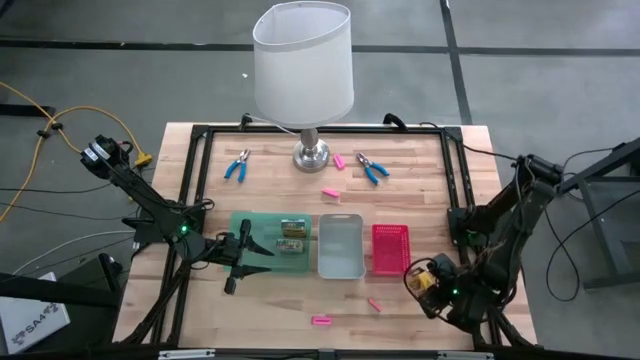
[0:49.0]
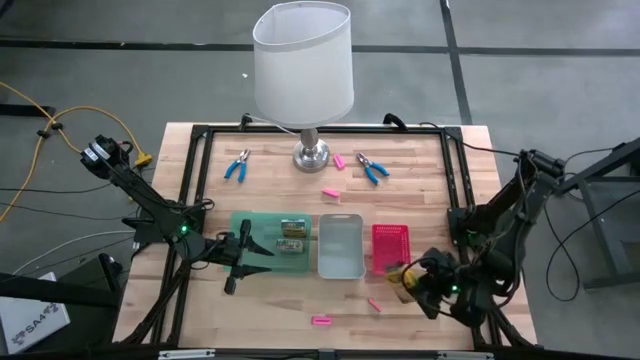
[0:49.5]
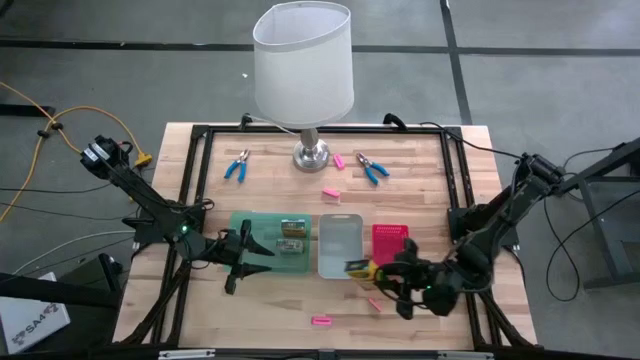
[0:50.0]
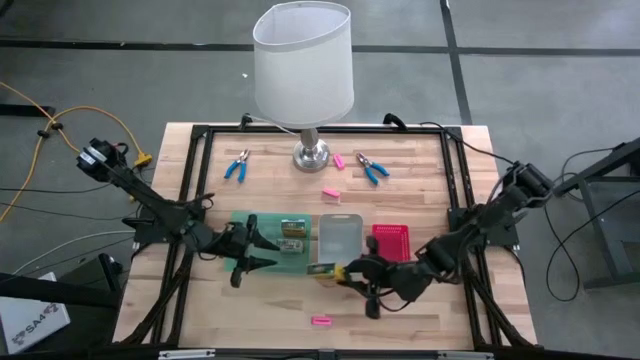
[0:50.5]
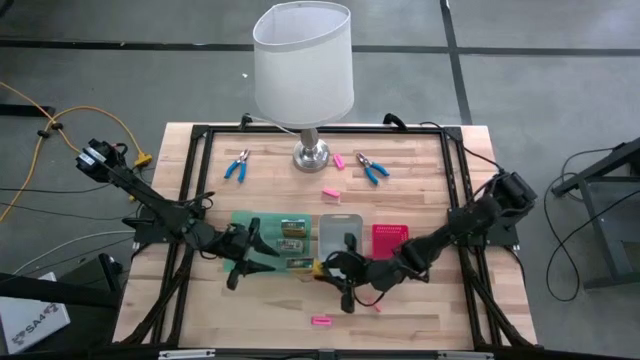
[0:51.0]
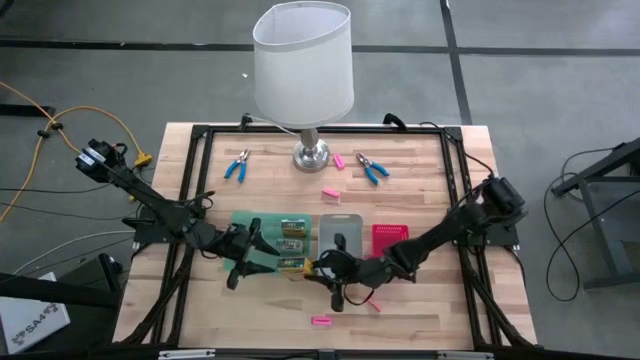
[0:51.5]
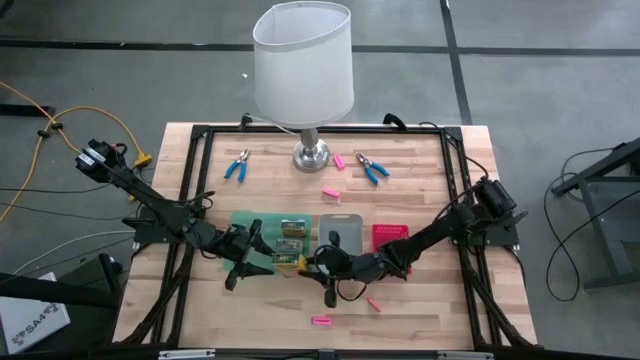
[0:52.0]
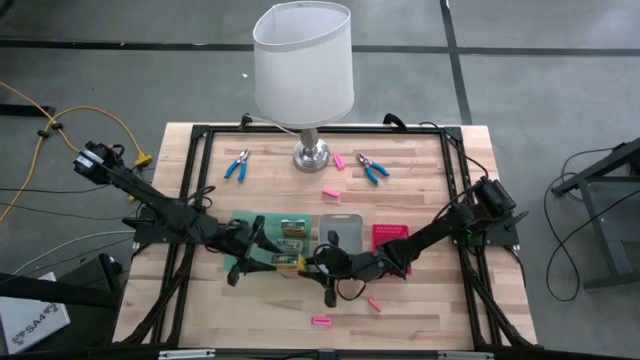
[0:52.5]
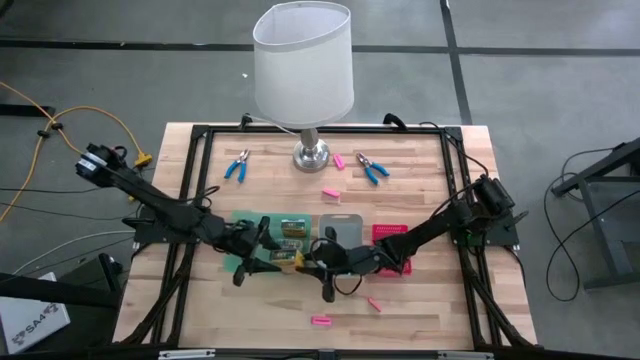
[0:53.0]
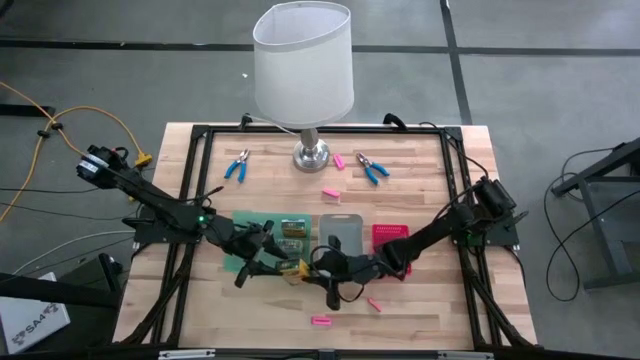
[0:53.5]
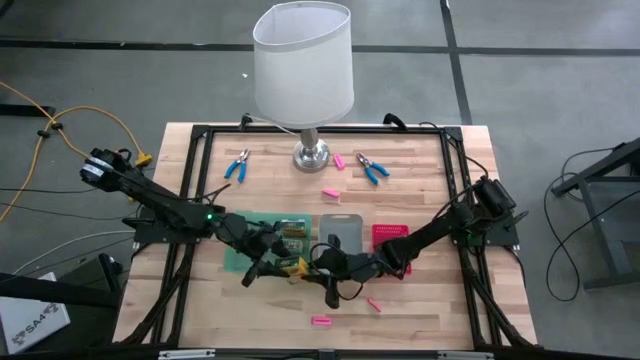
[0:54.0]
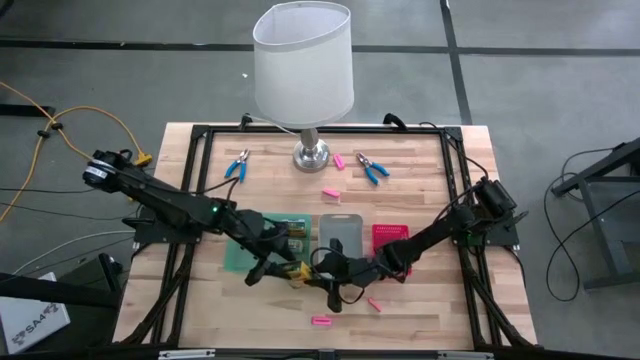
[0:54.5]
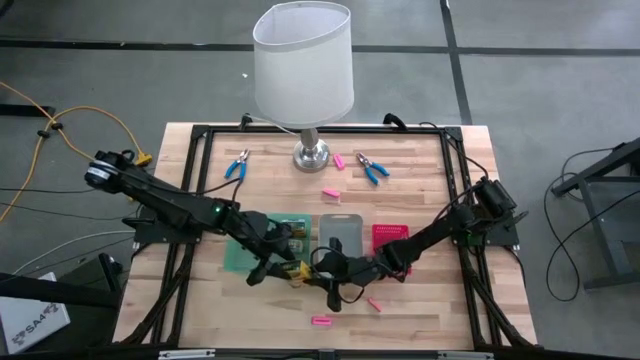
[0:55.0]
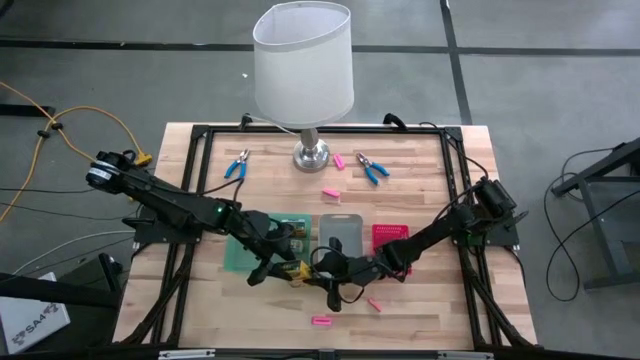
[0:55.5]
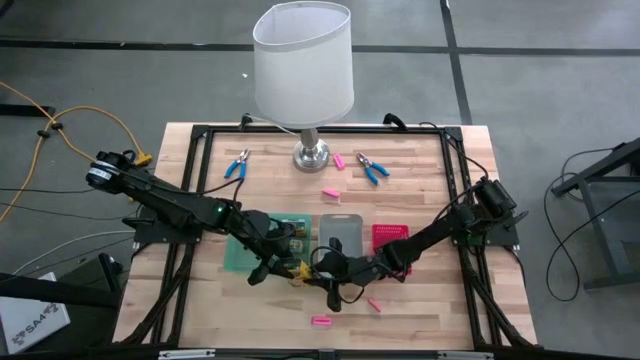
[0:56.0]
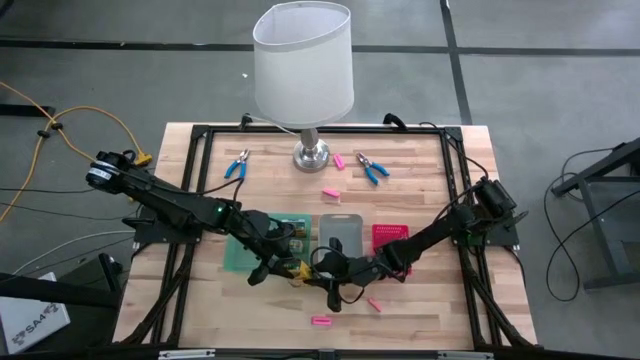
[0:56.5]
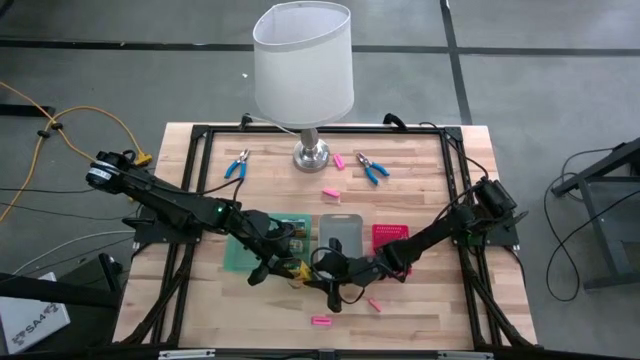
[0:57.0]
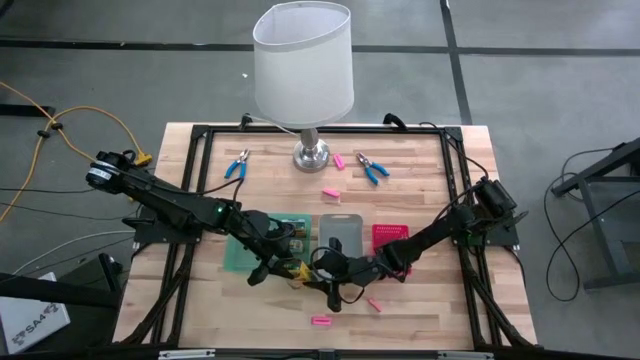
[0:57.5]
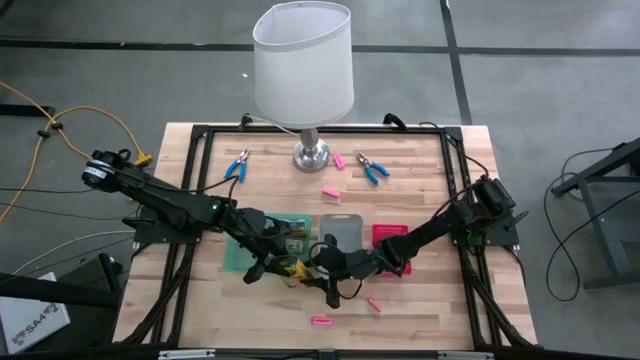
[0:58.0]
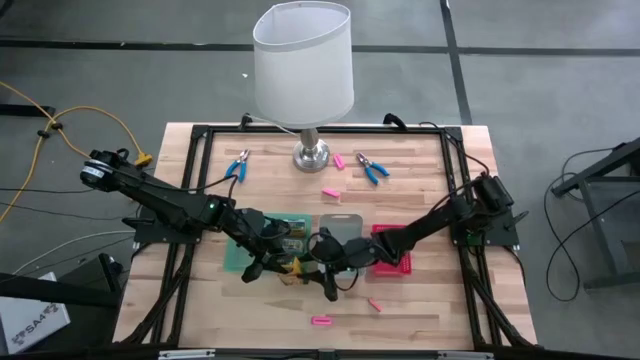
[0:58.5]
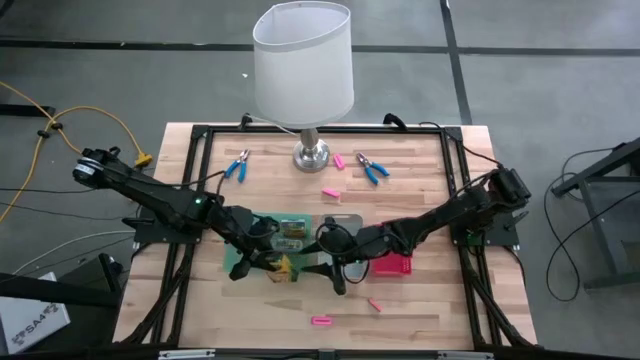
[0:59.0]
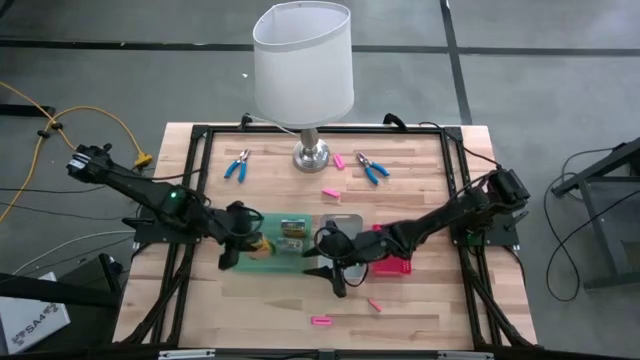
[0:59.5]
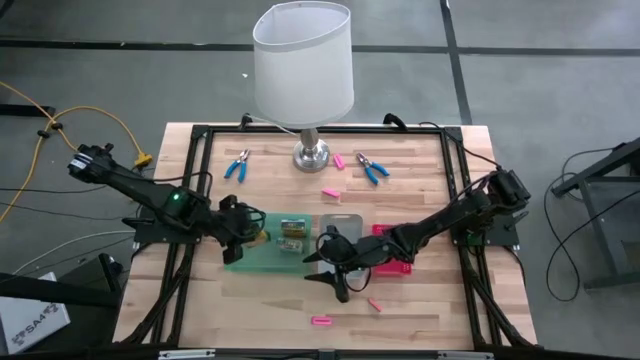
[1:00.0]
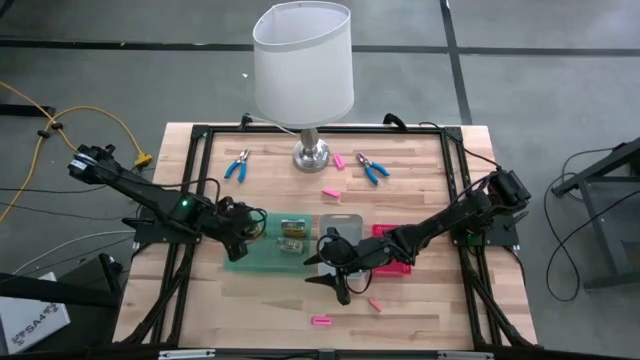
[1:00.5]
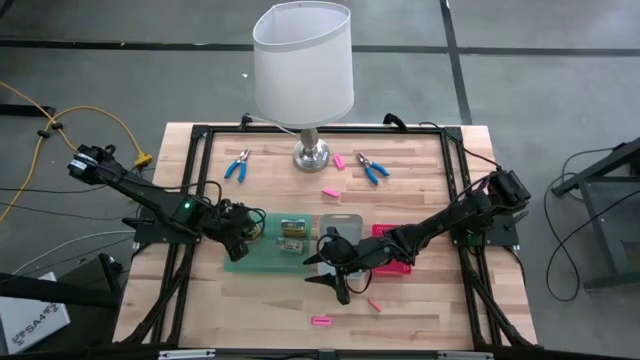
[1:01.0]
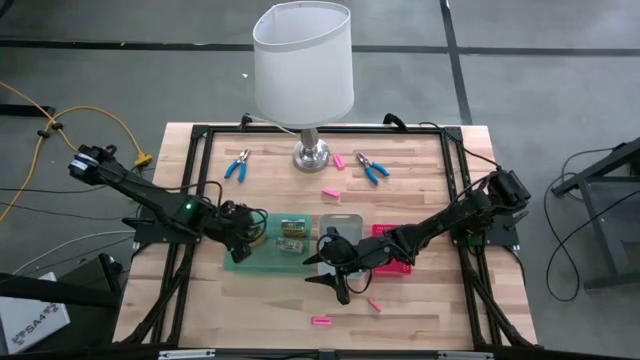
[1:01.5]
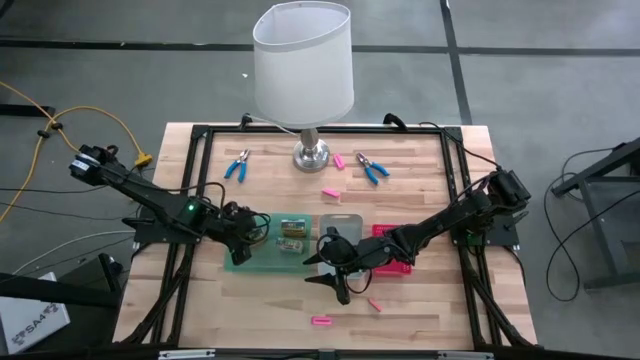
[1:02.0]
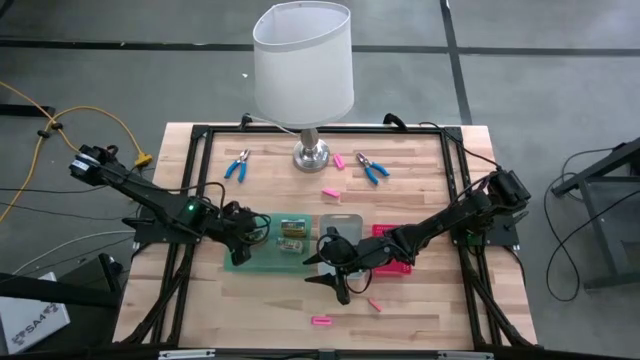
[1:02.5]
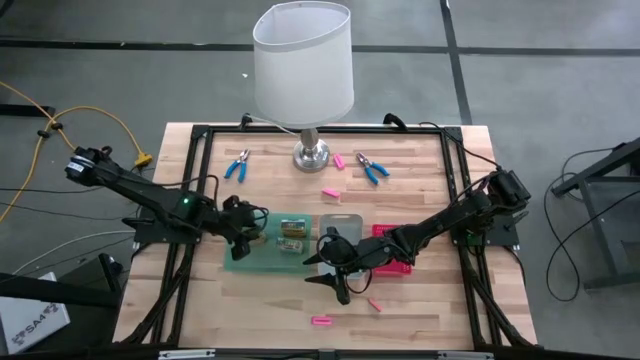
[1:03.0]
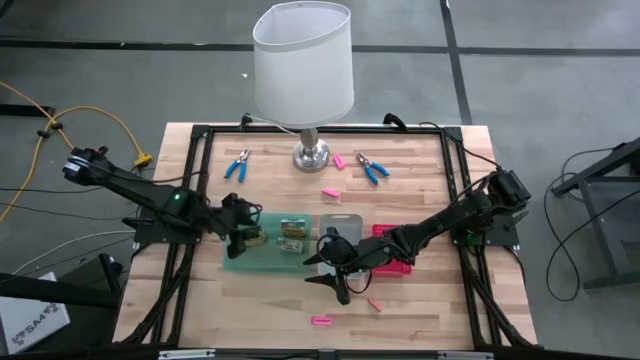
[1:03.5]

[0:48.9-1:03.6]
Task: Pick & Place School Supplies
Put the yellow box of crayons into the green bin

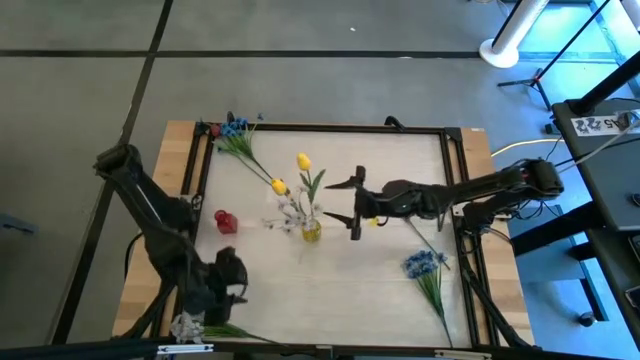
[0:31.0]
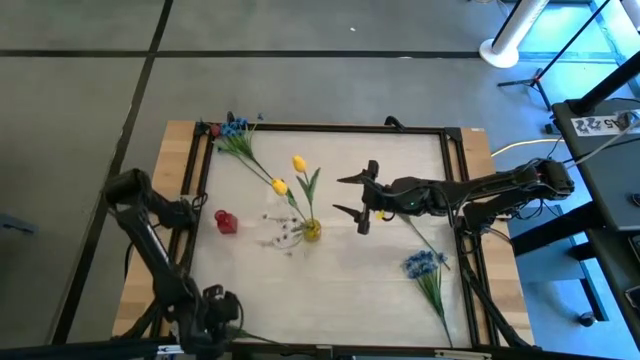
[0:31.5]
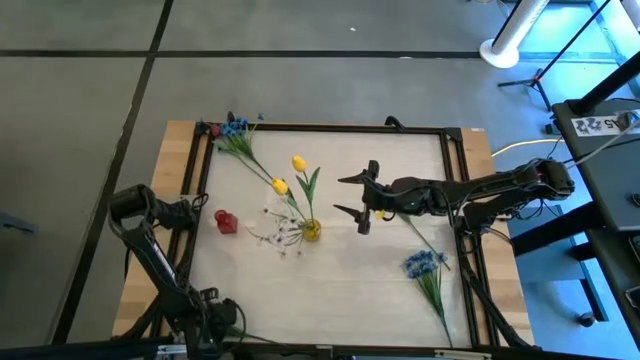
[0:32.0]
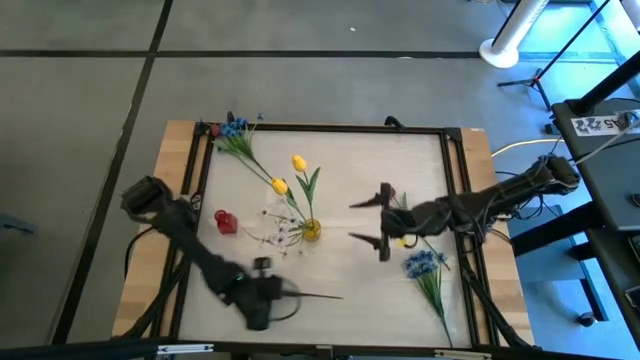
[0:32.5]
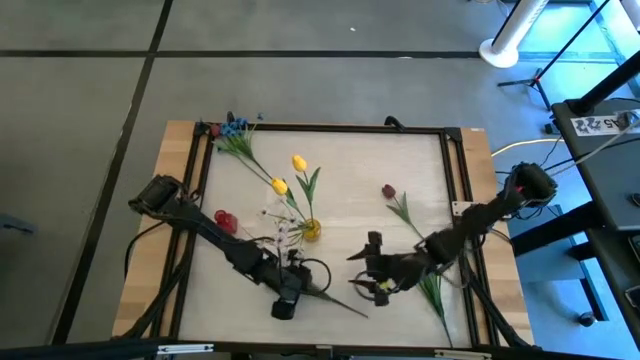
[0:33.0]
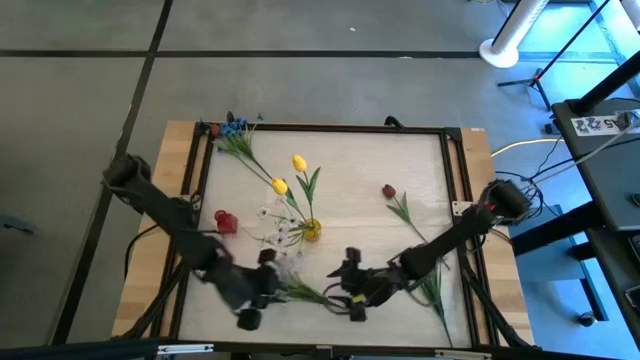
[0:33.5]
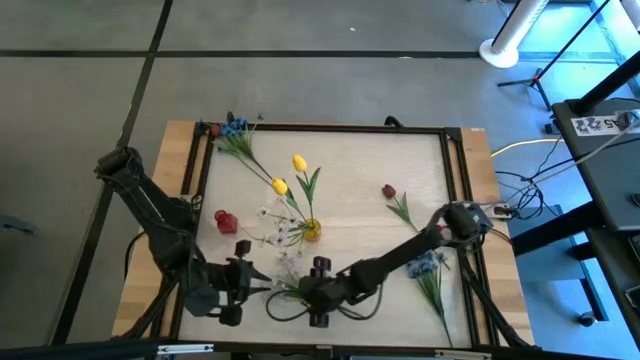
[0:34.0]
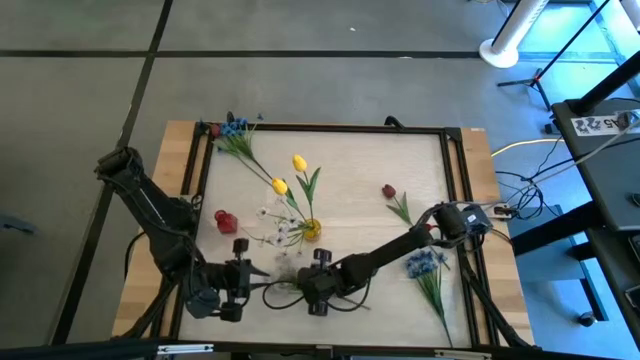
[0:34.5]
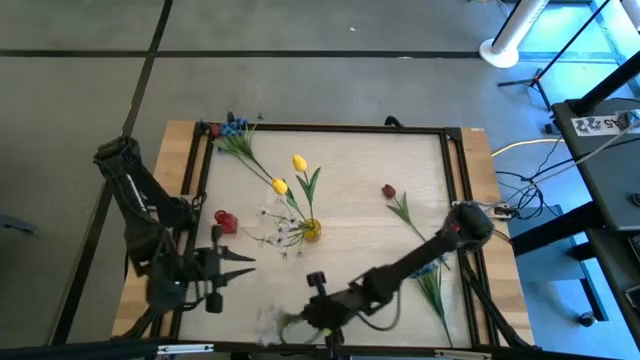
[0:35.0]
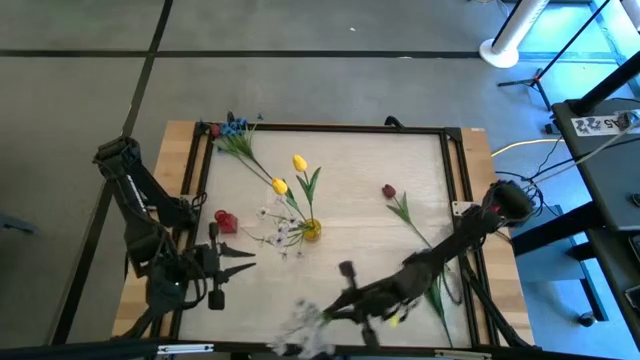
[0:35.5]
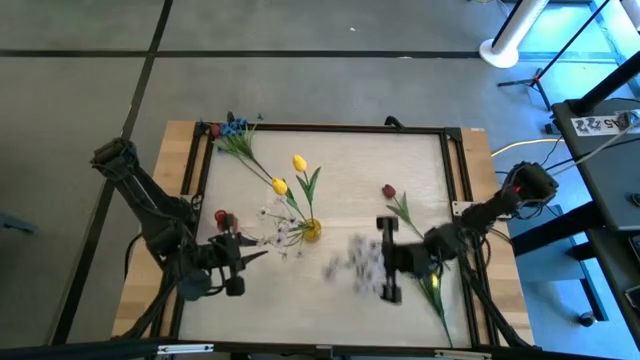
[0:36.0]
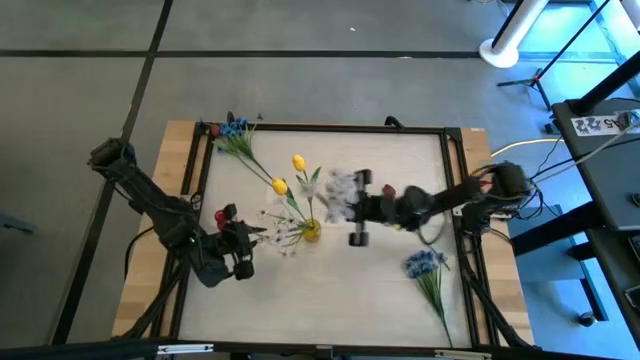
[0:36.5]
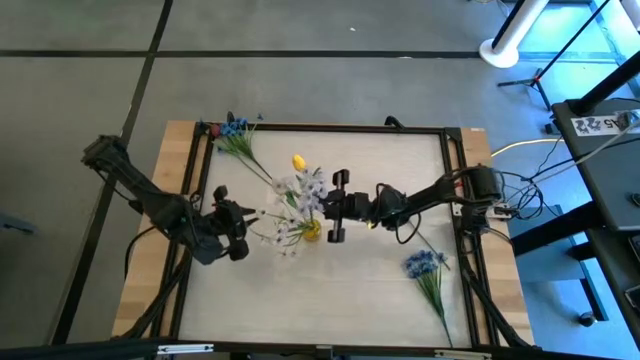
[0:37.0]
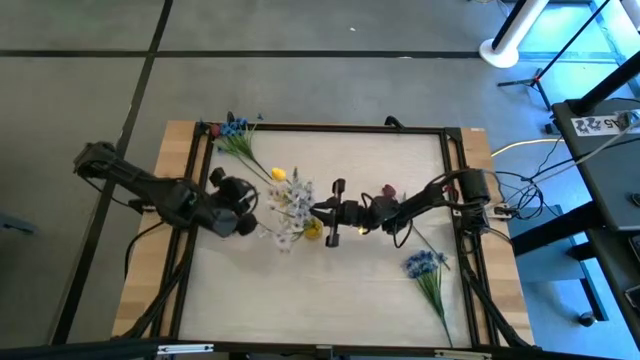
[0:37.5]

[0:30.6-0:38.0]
Task: Sort flowers into vase by color
Put the white flowers into the yellow flower vase
